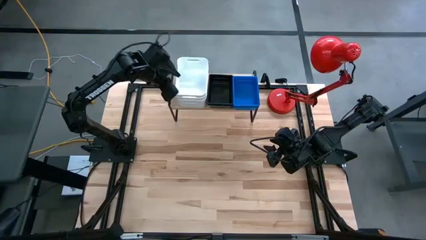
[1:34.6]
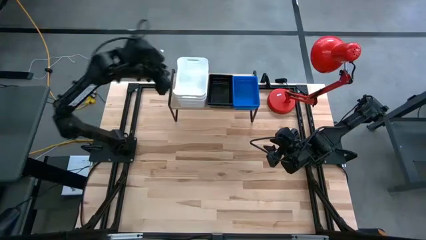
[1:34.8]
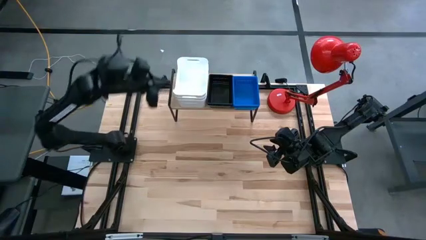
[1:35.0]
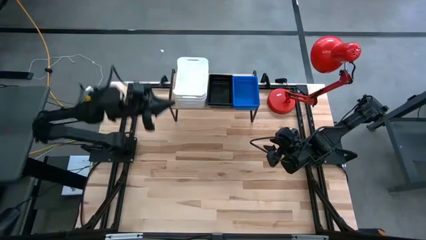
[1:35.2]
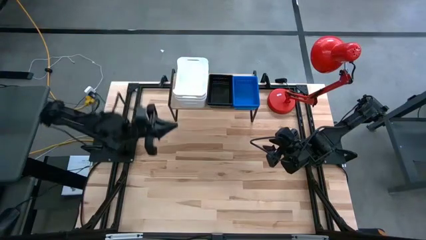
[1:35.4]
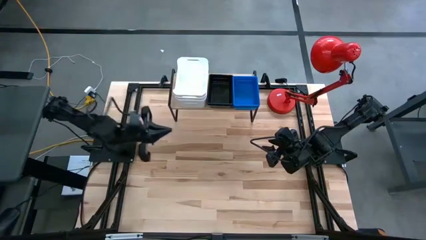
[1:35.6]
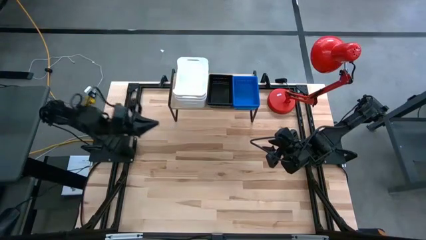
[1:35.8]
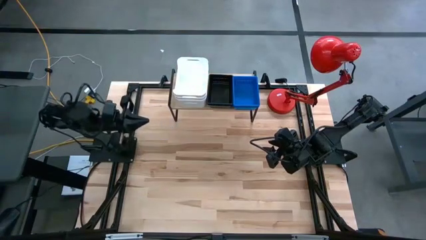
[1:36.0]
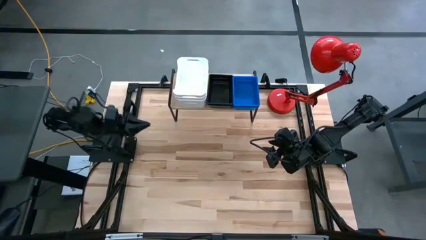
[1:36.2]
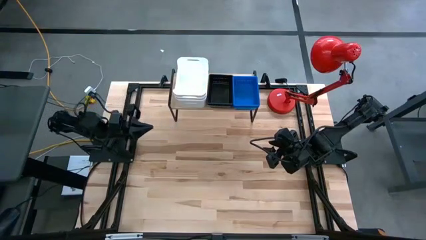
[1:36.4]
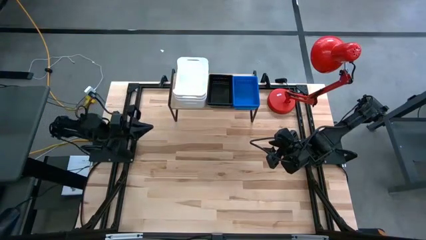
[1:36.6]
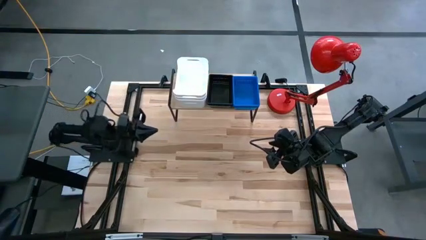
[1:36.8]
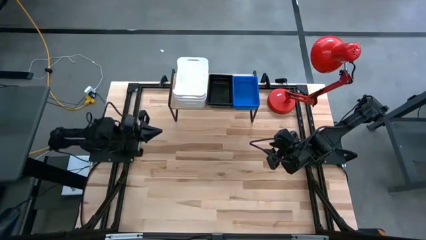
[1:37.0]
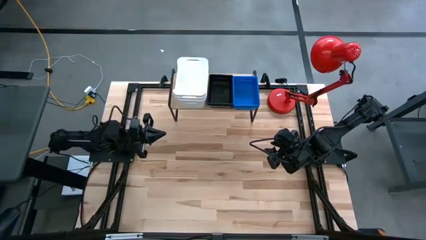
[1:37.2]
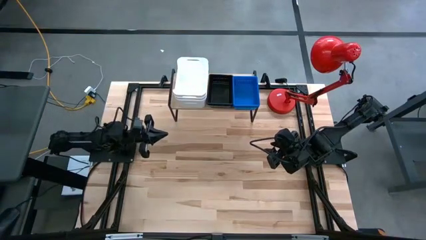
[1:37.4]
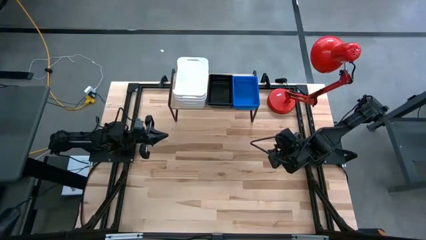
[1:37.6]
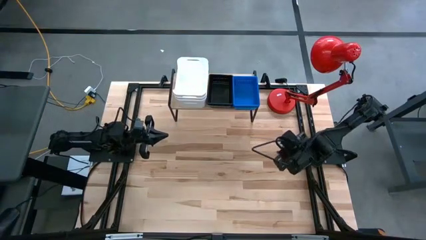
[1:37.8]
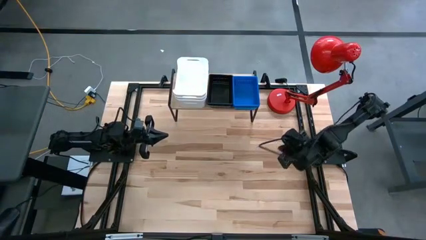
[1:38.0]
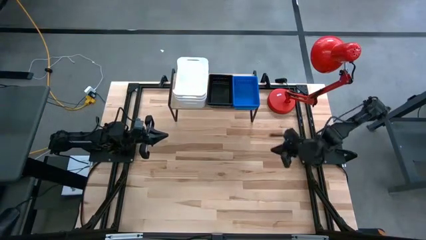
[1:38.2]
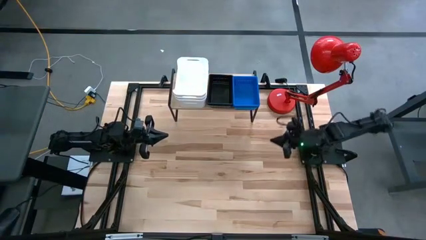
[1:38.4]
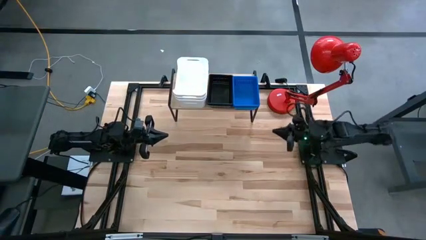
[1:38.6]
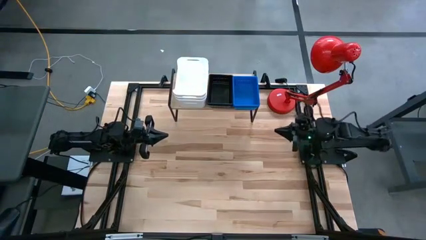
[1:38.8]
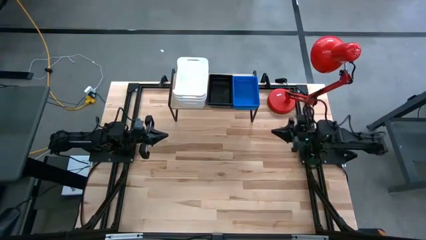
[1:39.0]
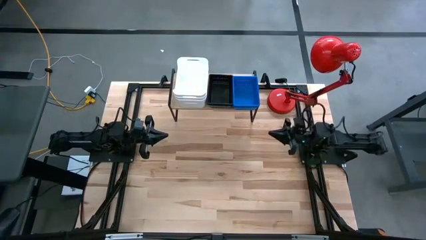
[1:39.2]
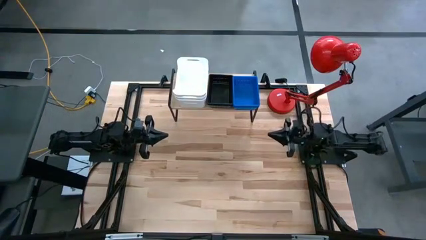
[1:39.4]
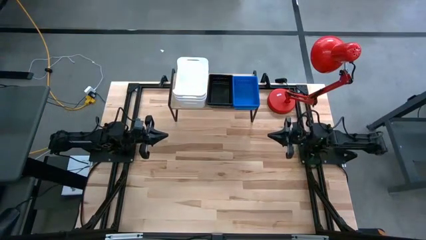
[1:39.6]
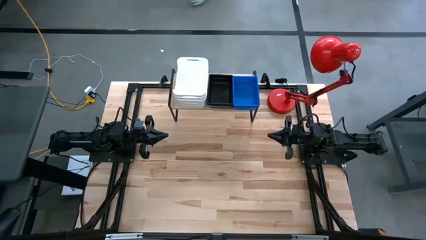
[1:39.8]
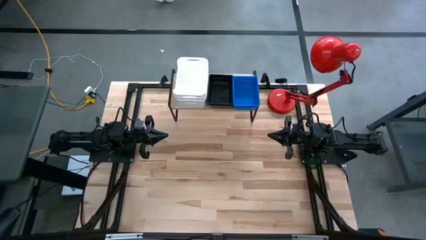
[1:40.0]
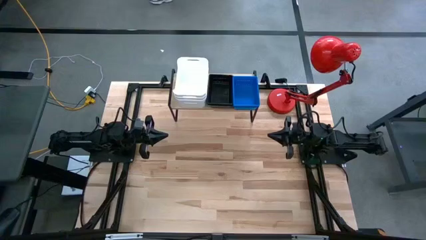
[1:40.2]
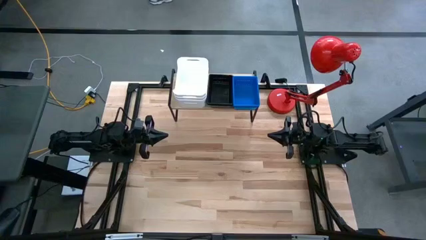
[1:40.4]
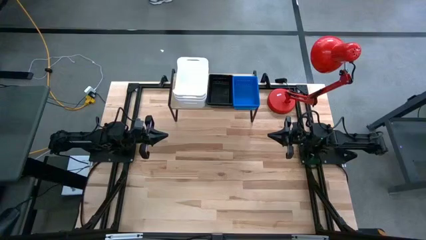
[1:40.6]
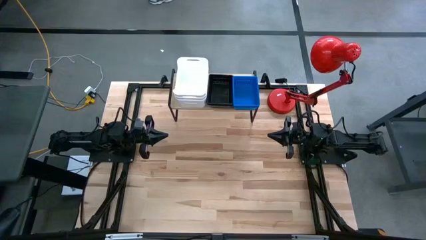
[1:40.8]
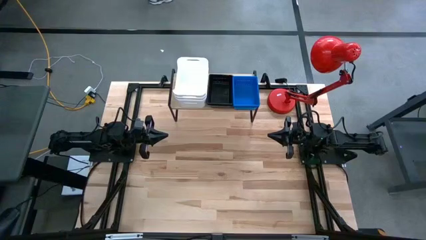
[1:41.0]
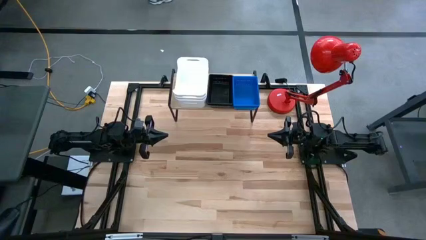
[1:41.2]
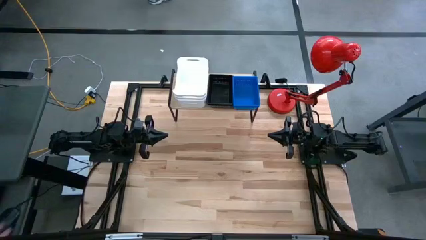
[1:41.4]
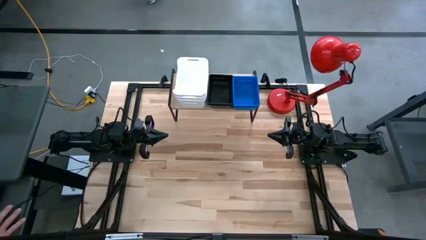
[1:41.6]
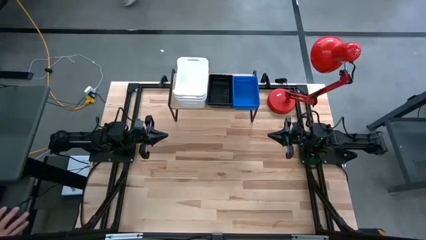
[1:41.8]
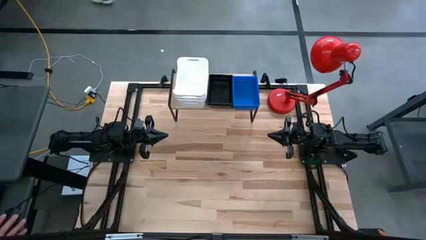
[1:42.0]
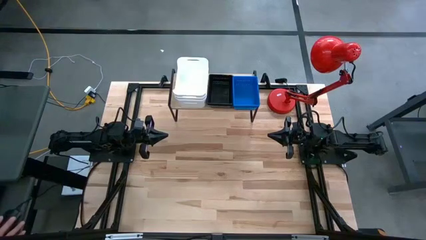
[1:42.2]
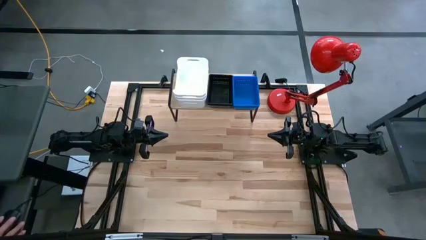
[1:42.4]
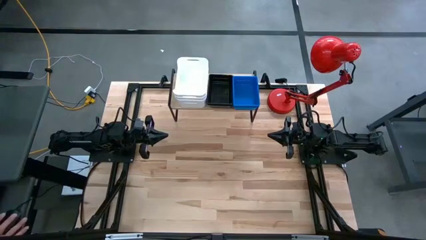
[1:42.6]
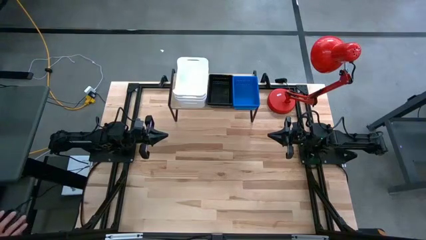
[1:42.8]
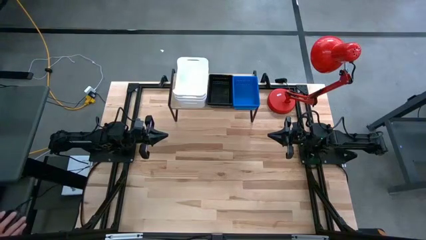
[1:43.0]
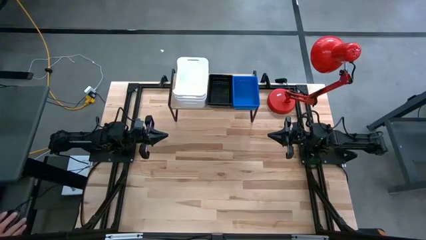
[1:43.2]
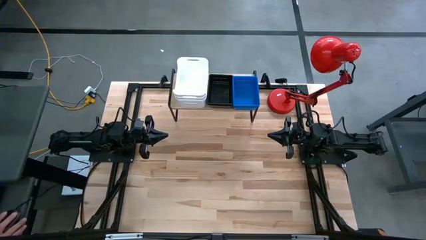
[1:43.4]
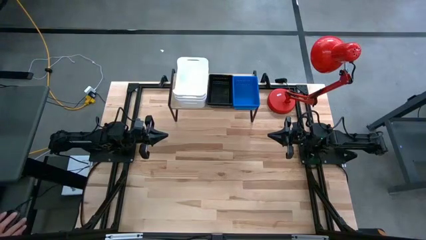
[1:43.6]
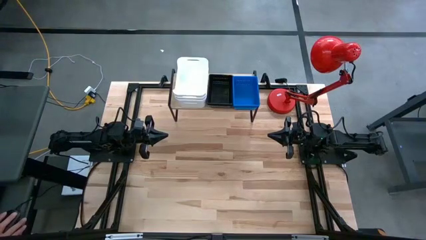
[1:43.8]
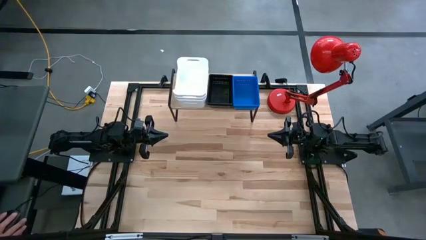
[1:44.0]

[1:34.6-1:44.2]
Task: Stack baskets on shelf by color
Return to Home Position

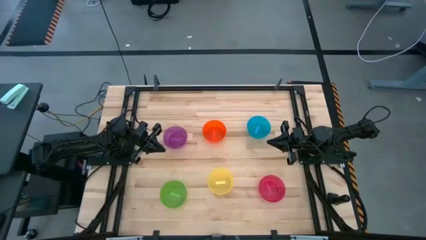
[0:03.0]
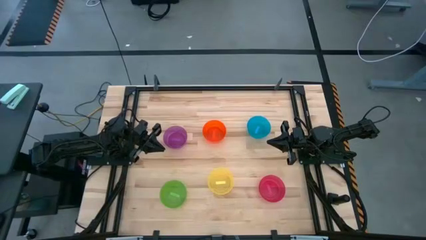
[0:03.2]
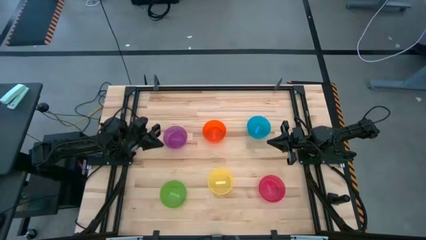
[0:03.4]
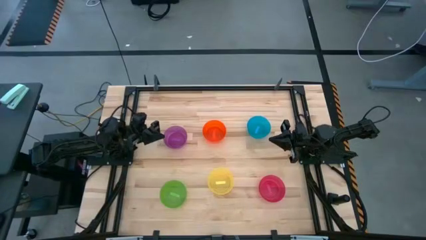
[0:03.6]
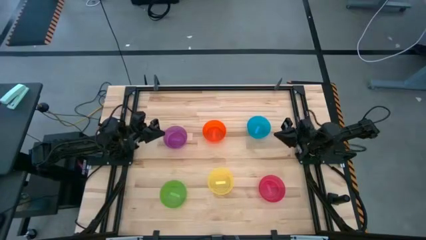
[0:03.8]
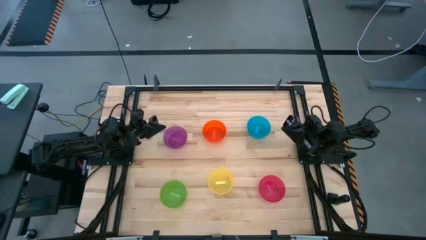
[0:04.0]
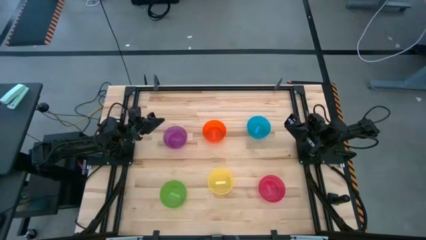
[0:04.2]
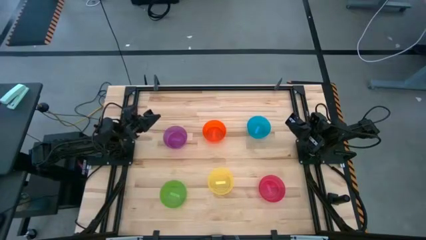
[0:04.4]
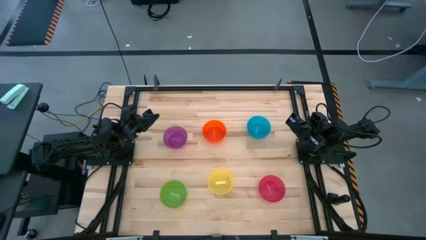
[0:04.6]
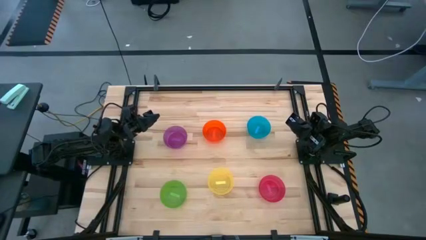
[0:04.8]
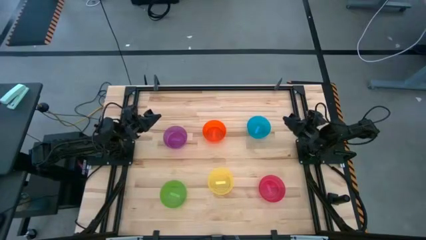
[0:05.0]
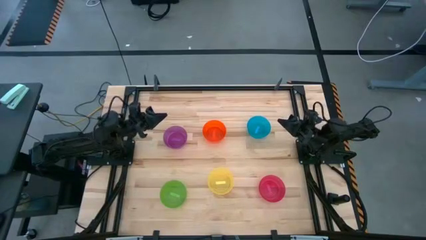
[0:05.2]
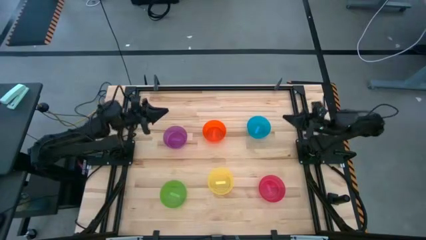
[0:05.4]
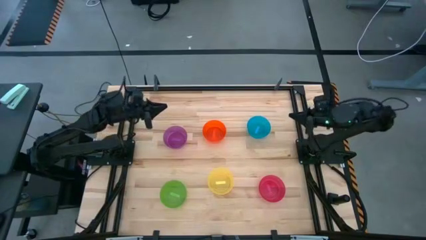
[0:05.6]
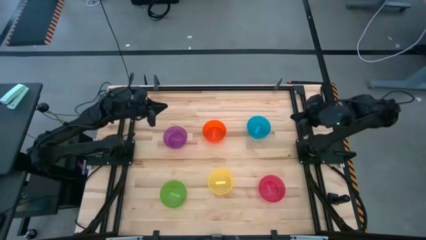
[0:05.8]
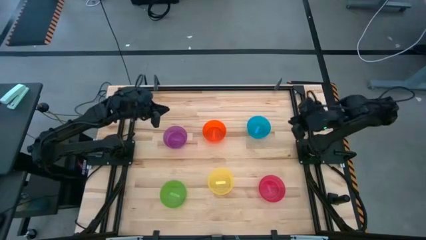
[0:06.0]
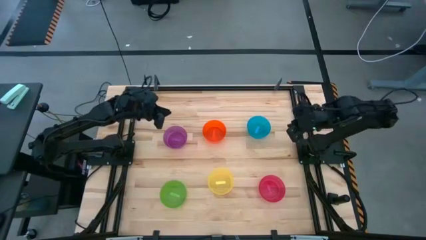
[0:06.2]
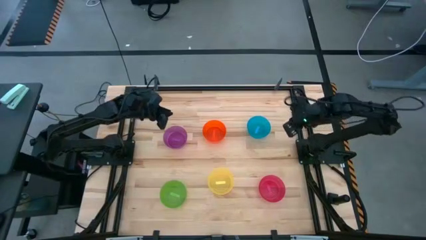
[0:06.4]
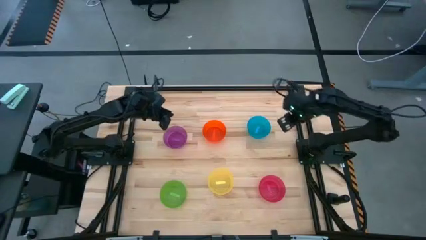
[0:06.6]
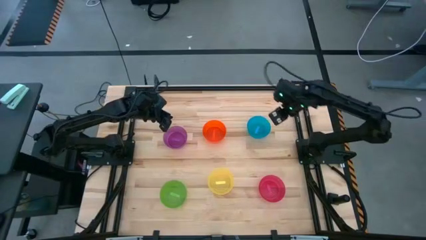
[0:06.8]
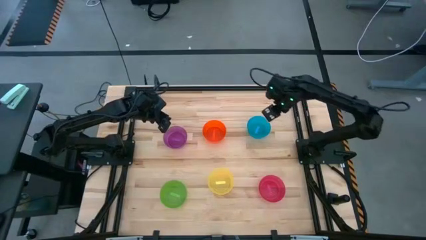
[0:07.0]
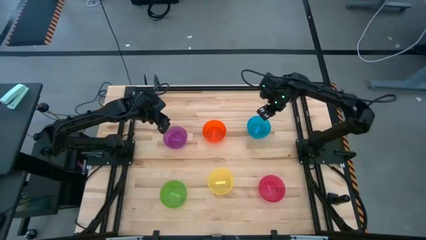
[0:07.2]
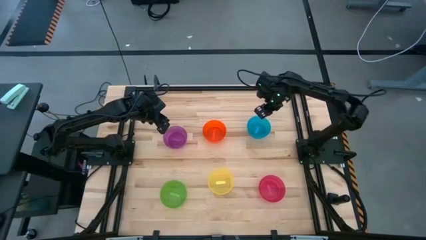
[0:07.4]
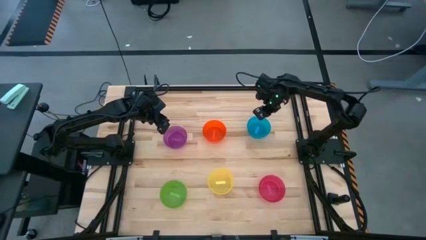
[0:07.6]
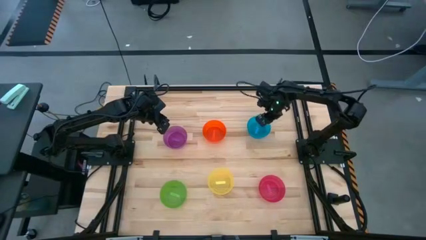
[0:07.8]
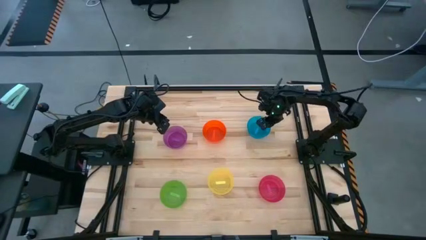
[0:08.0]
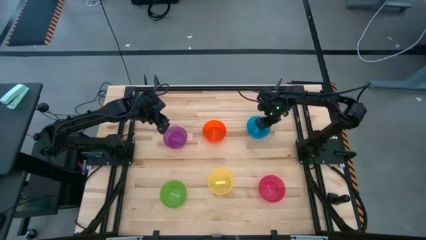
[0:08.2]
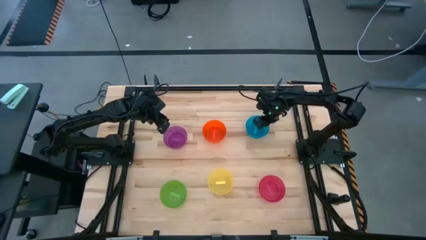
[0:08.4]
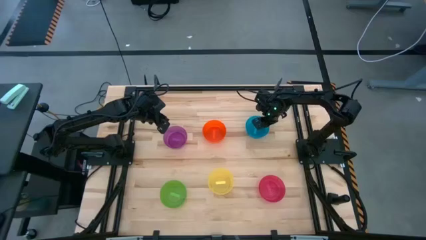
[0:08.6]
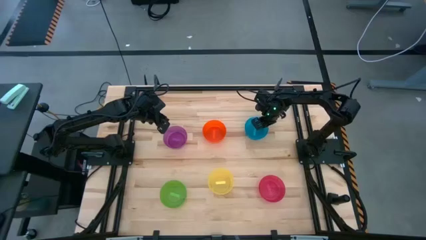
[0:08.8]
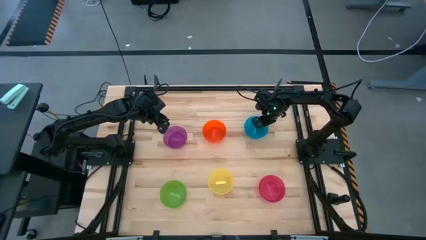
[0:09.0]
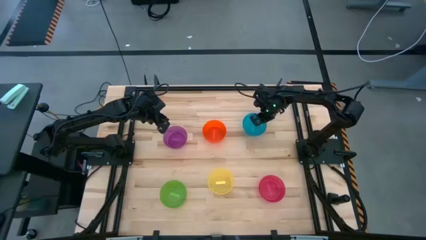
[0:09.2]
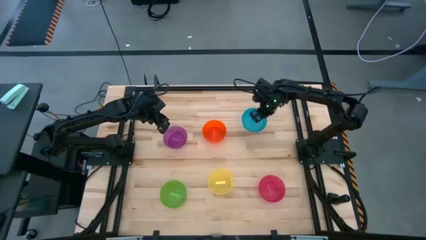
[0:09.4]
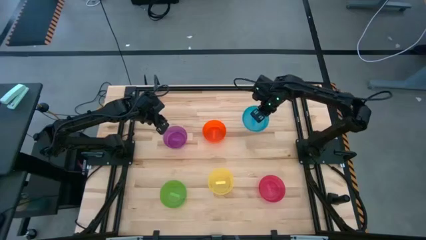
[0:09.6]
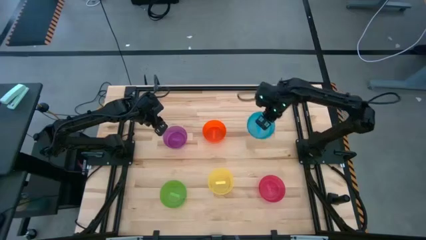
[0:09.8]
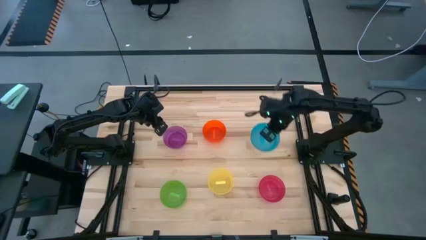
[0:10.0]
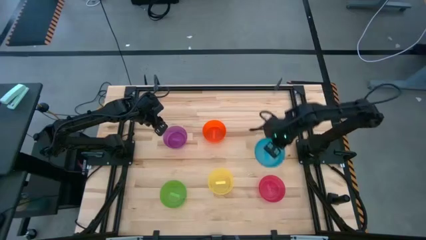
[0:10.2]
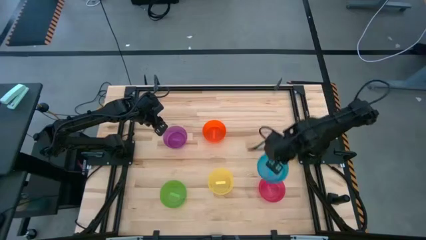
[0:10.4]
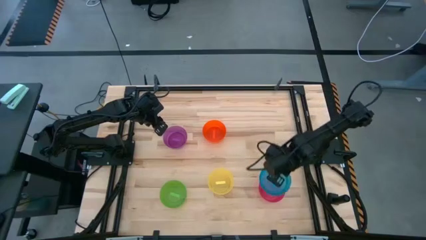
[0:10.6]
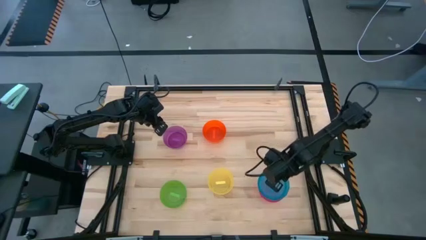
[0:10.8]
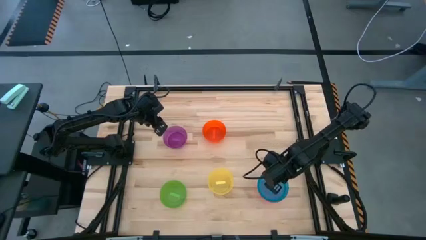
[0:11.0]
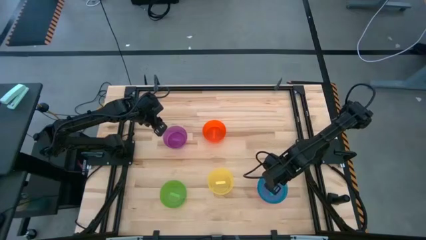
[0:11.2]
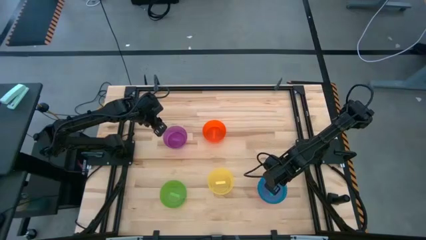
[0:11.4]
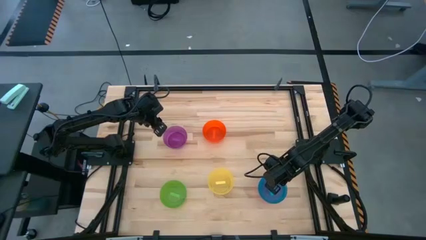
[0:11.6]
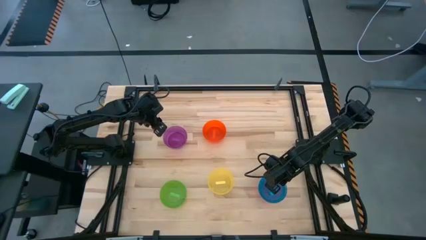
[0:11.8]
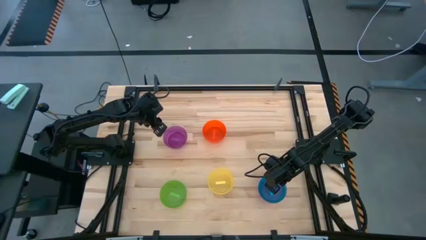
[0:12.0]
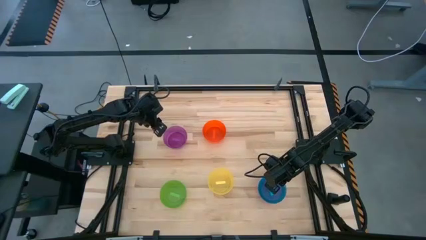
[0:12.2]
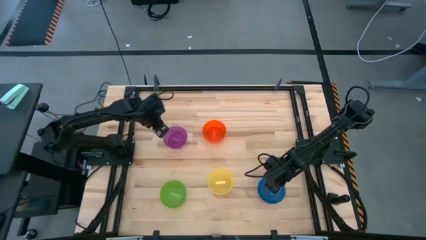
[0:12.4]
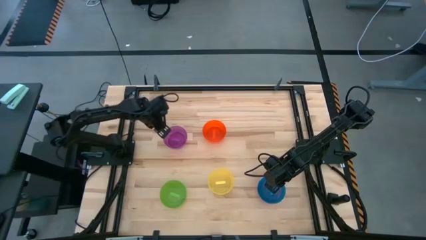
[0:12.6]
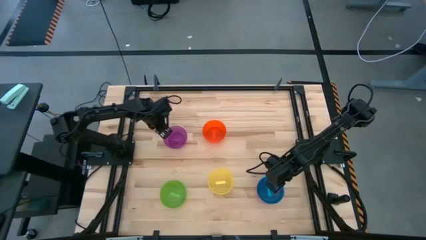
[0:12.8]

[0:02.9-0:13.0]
Task: Nest bowls inside each other
Stack the blue bowl on top of the red bowl
